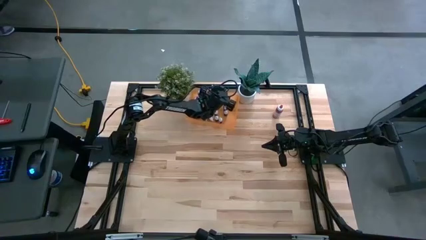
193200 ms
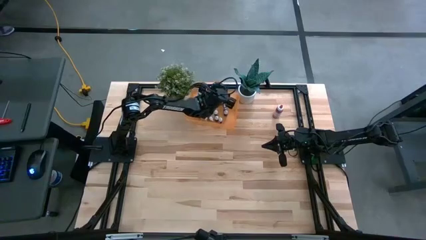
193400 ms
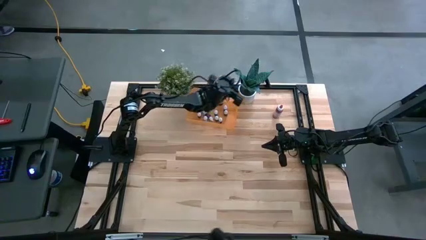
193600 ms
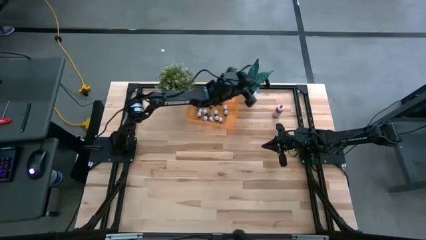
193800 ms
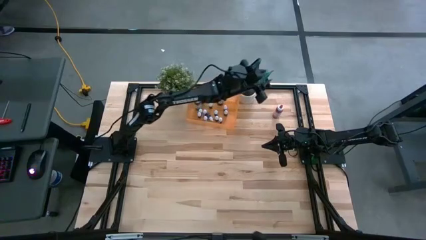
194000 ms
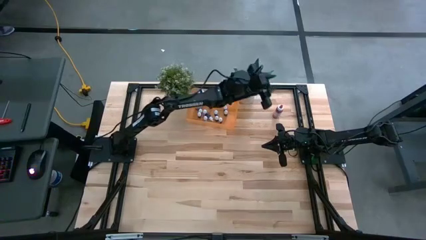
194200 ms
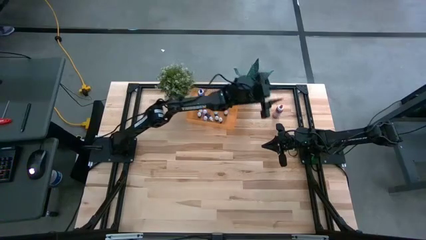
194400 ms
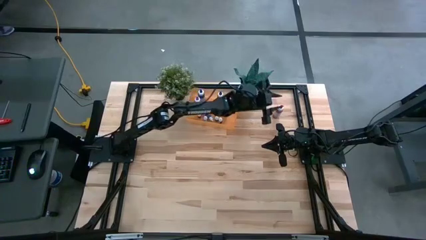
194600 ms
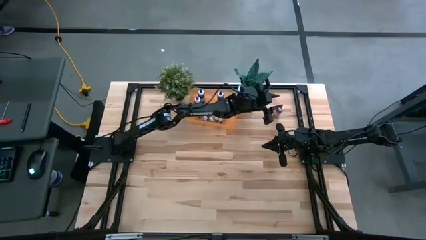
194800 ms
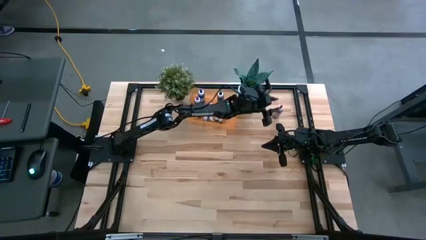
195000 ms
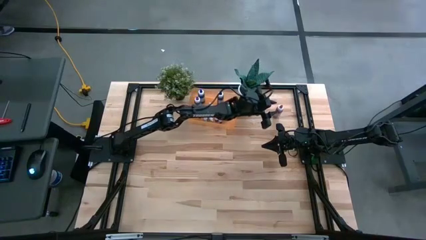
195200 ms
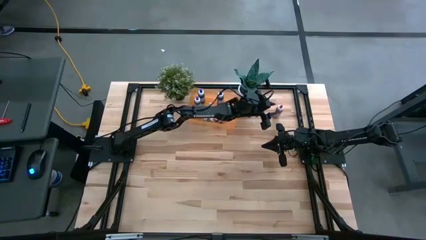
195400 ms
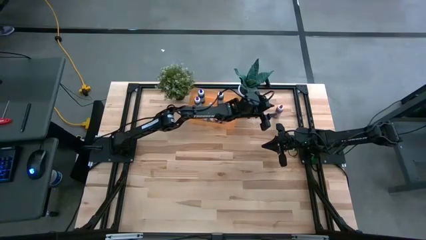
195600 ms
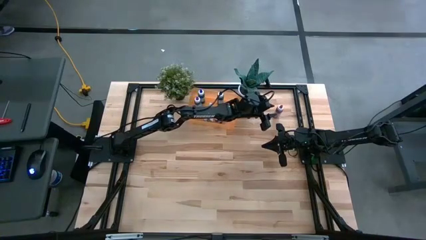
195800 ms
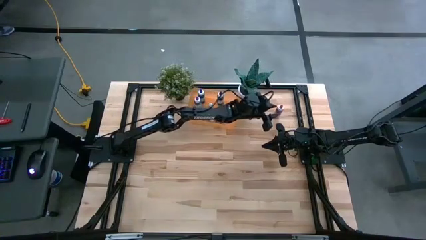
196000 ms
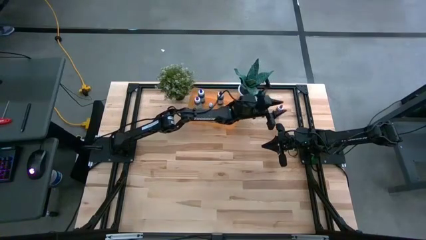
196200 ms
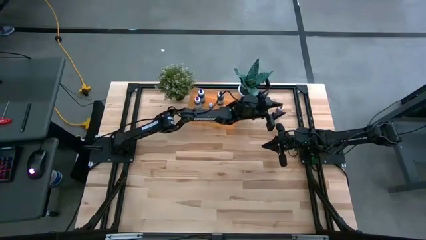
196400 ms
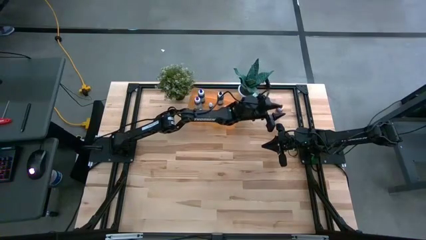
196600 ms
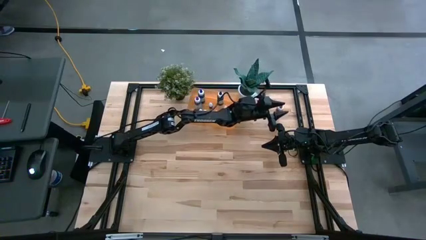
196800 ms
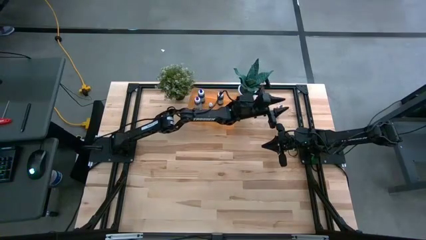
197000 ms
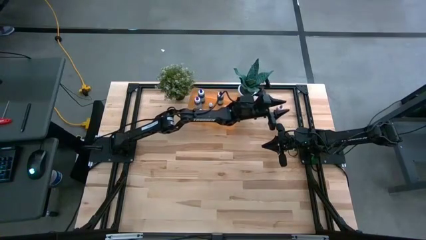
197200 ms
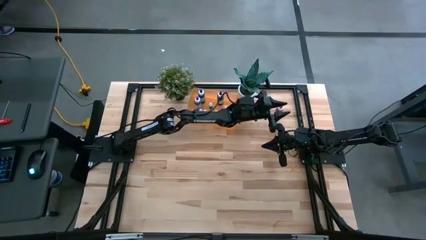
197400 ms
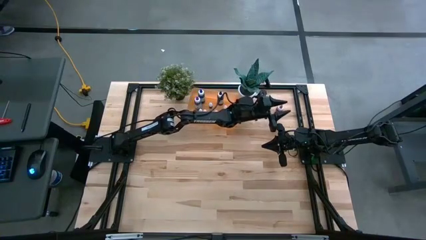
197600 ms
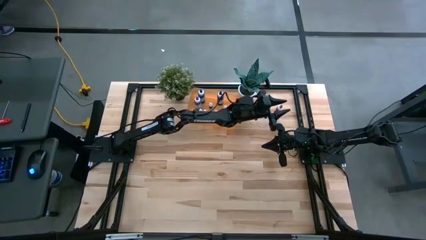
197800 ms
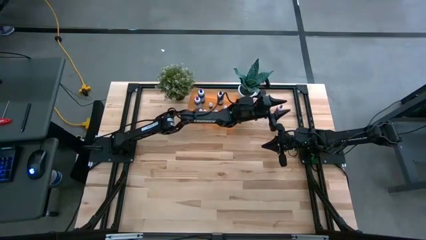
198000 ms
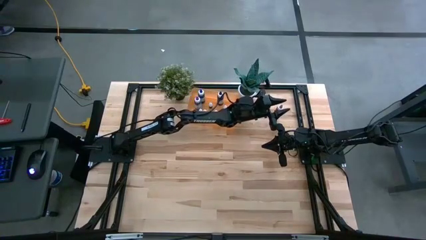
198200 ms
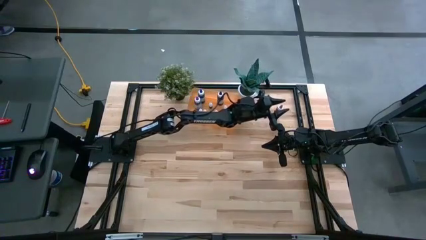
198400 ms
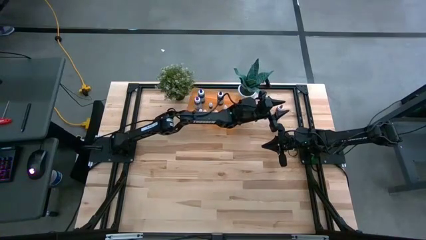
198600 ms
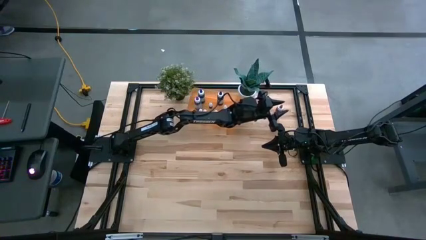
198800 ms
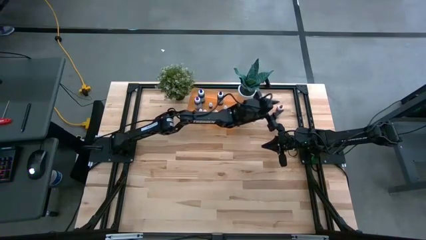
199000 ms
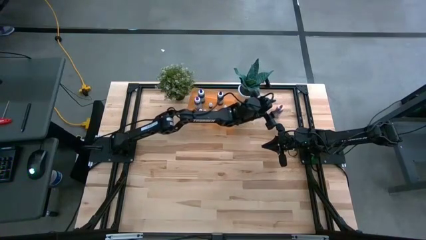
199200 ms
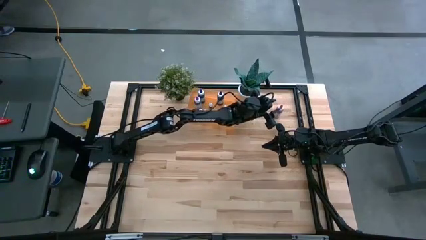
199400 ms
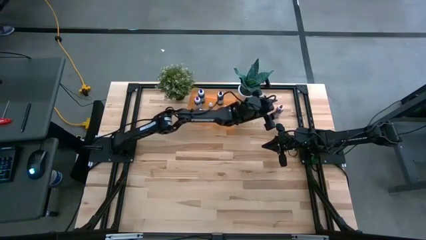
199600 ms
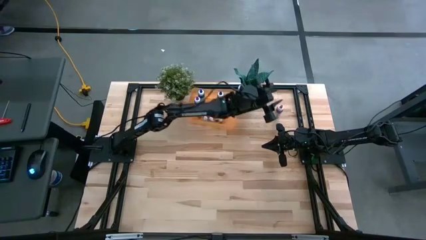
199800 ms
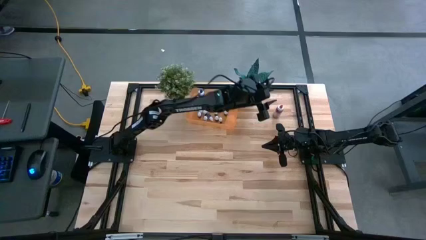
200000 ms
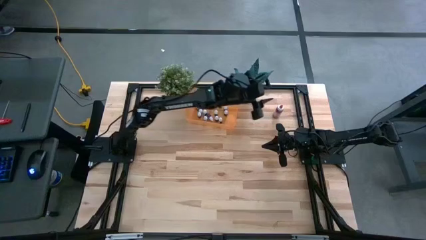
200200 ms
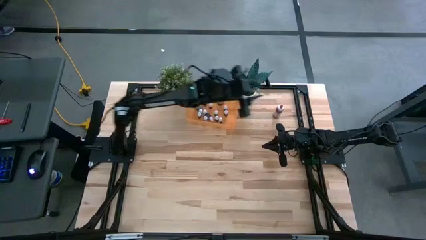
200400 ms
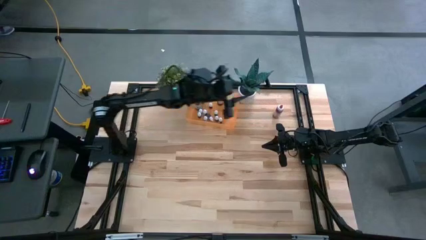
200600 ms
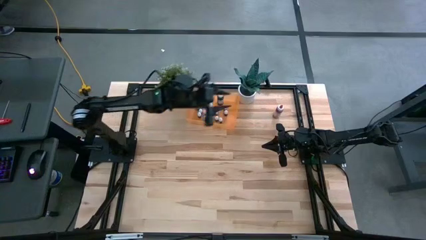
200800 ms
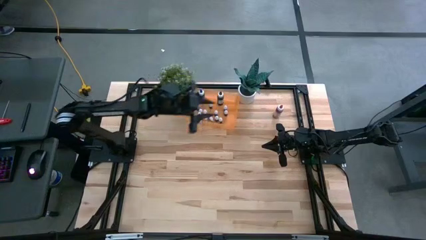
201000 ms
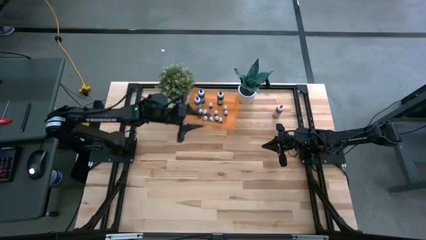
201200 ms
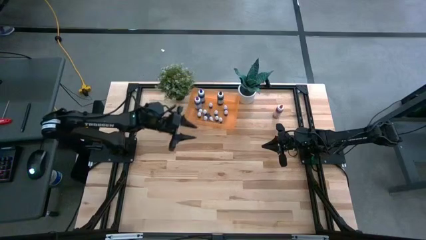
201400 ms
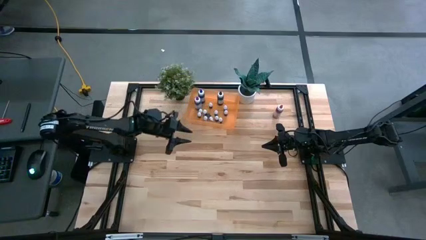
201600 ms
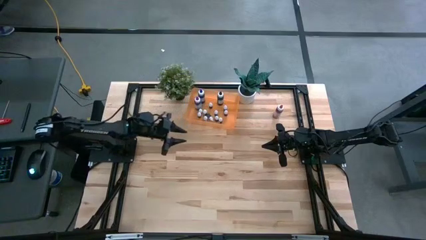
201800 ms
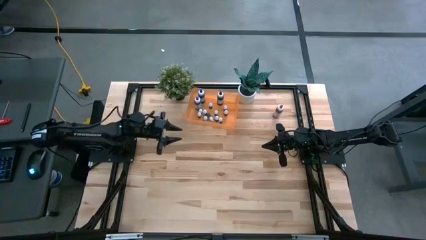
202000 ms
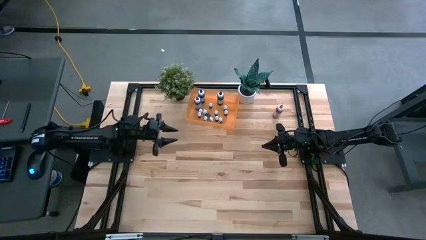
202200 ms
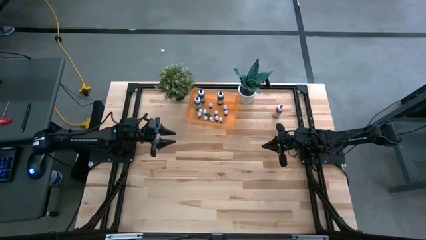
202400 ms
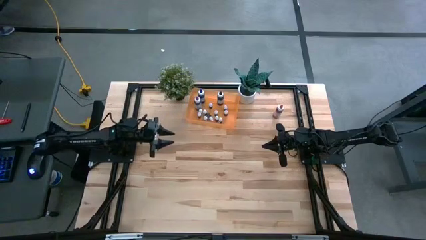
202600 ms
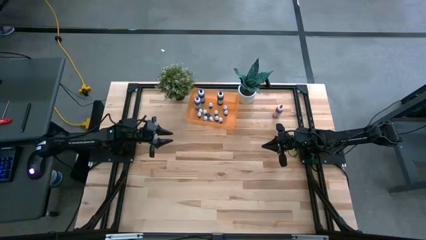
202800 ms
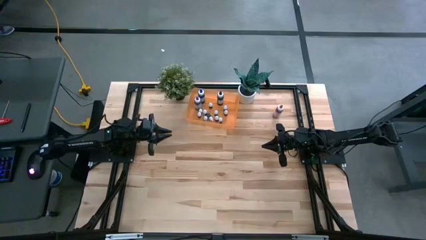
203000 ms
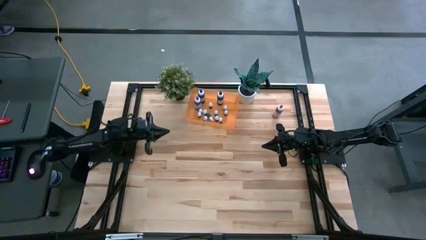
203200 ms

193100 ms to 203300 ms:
Task: Pick & Place food coloring
Put the large pink bottle into the bin

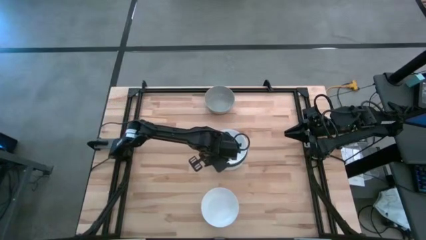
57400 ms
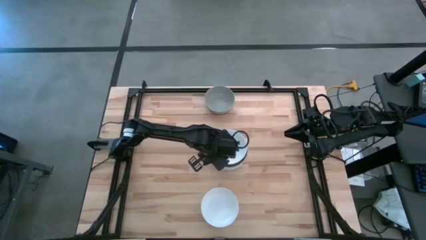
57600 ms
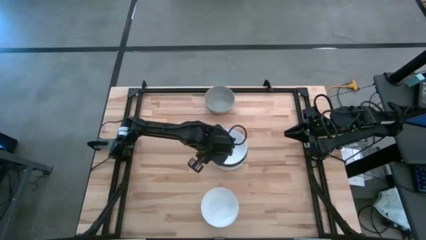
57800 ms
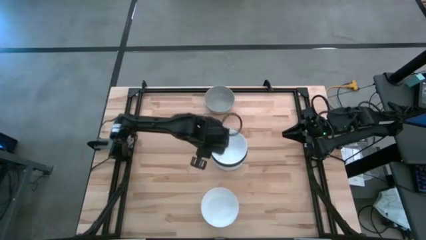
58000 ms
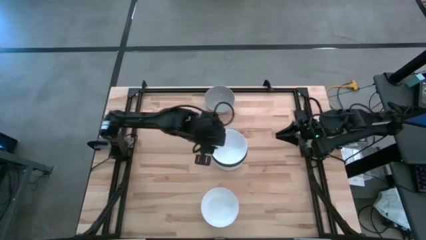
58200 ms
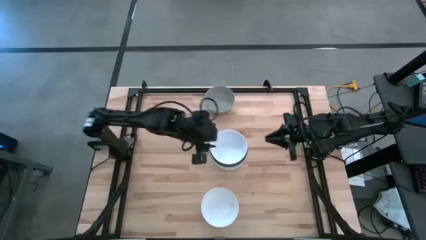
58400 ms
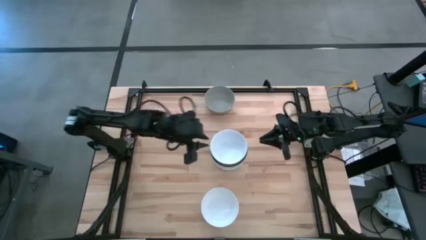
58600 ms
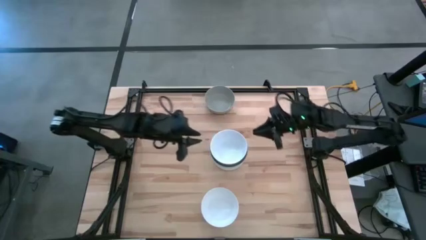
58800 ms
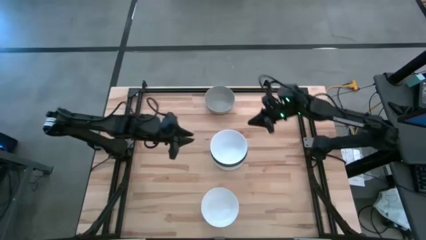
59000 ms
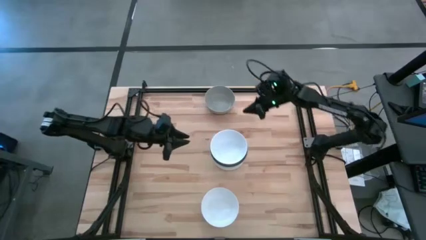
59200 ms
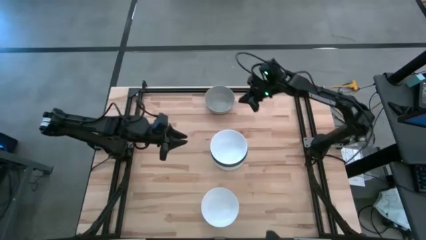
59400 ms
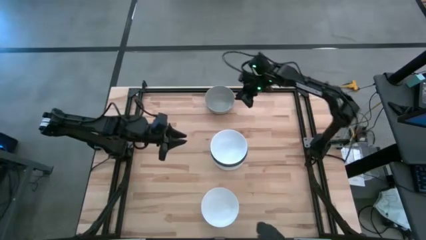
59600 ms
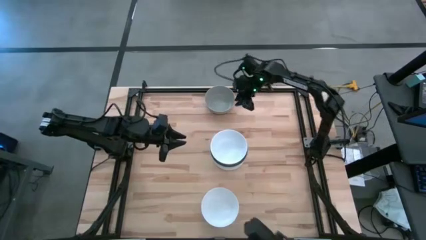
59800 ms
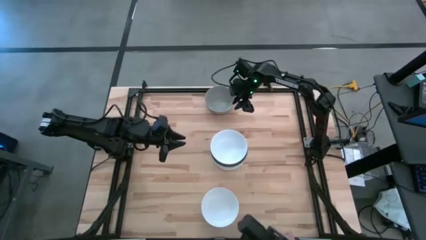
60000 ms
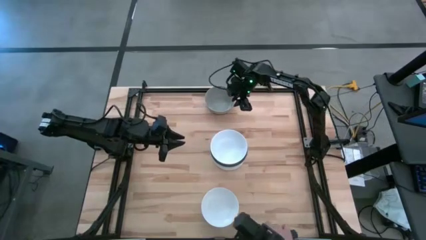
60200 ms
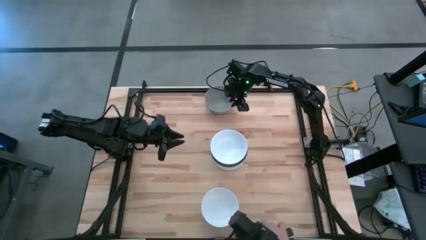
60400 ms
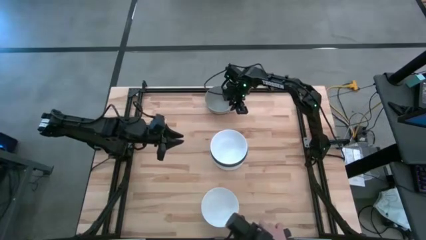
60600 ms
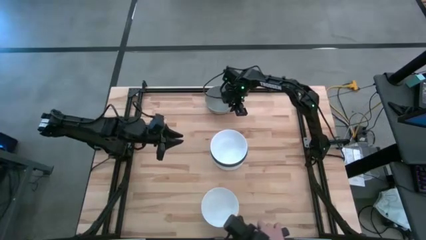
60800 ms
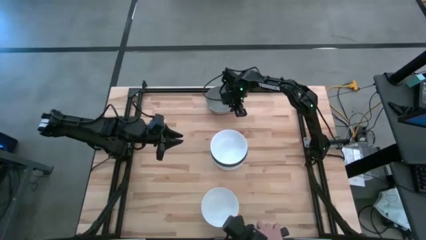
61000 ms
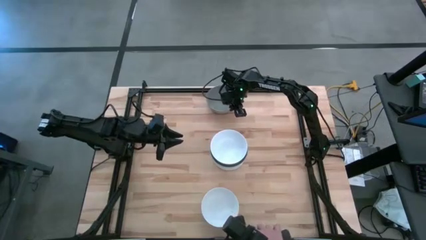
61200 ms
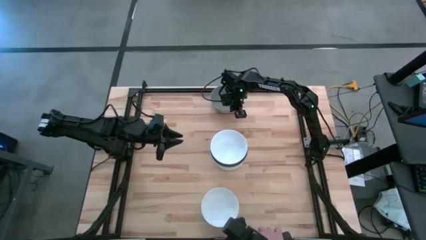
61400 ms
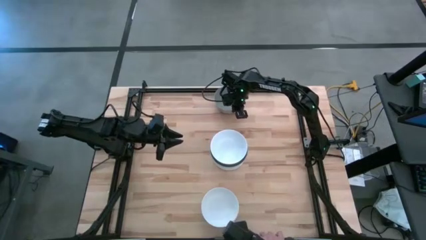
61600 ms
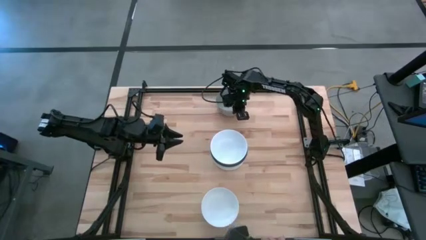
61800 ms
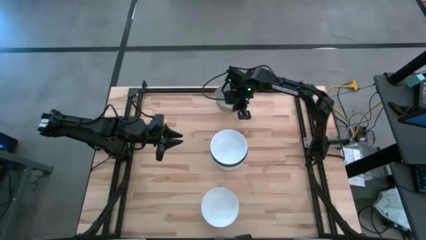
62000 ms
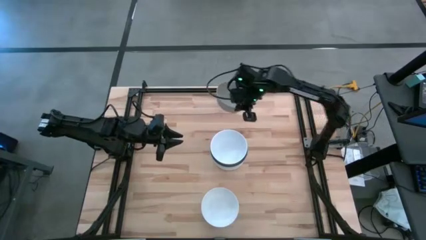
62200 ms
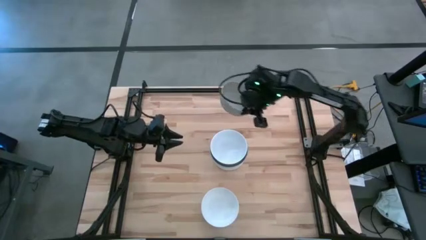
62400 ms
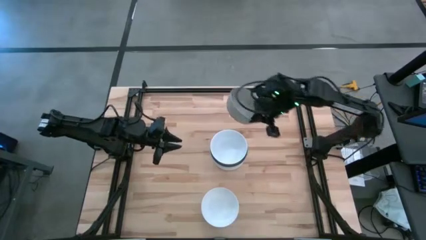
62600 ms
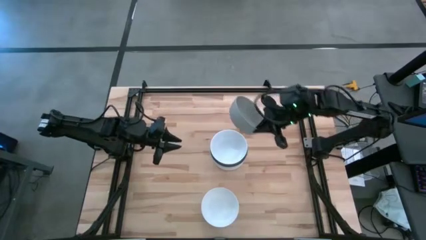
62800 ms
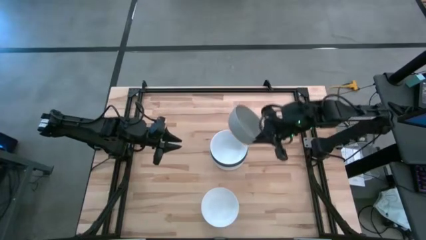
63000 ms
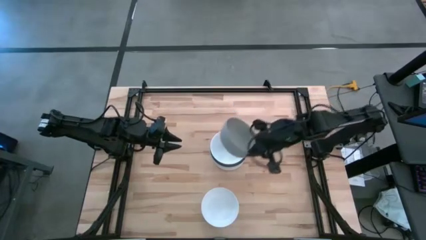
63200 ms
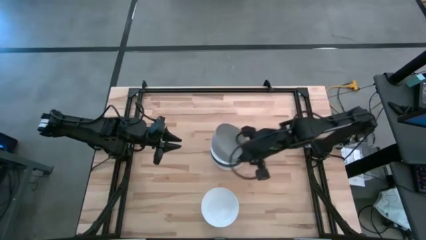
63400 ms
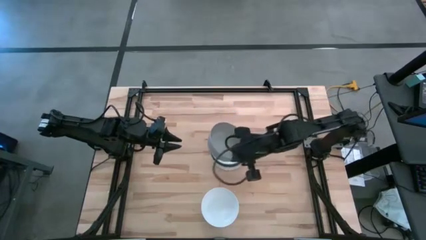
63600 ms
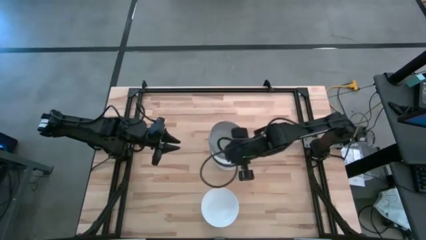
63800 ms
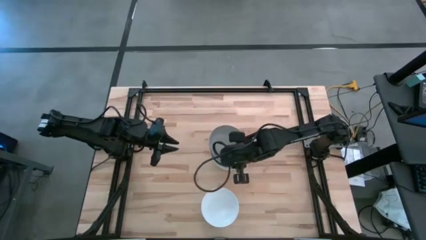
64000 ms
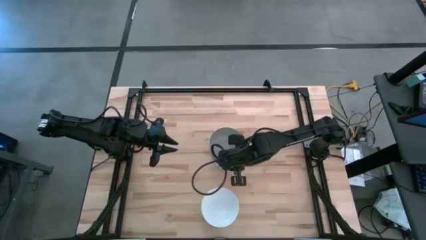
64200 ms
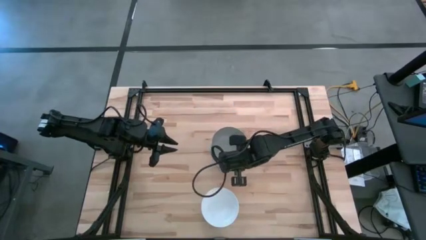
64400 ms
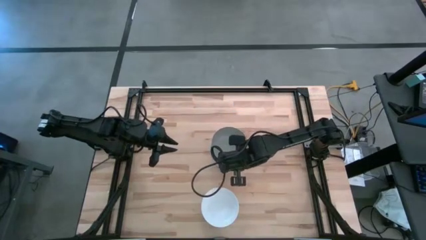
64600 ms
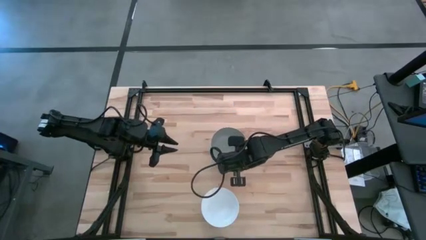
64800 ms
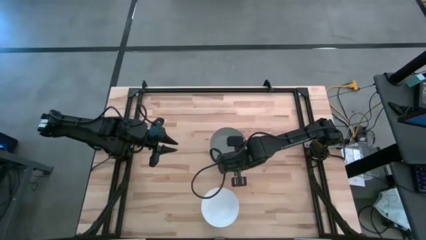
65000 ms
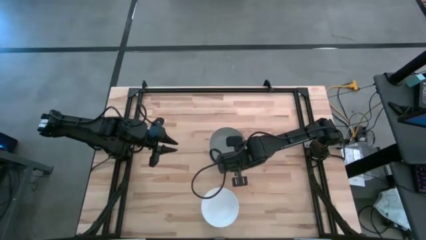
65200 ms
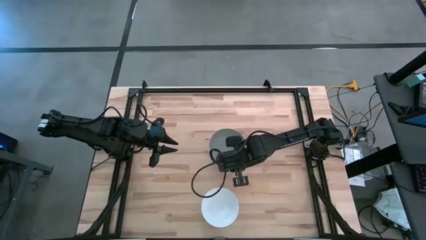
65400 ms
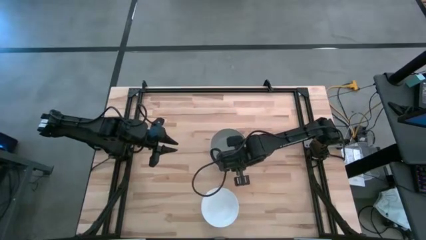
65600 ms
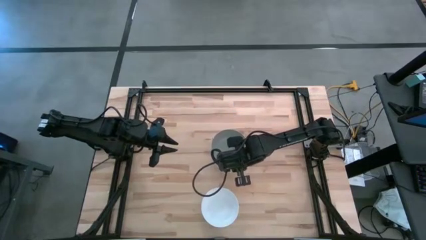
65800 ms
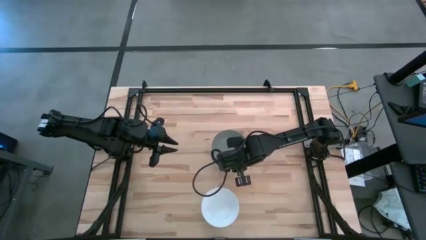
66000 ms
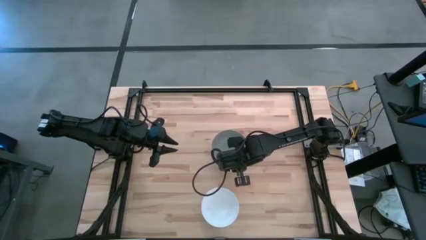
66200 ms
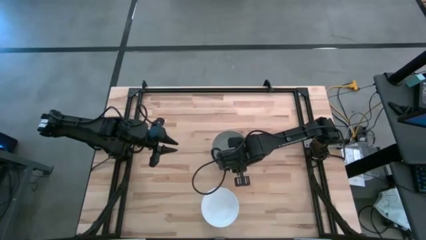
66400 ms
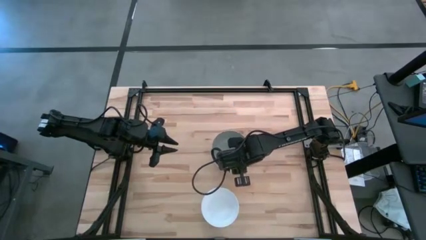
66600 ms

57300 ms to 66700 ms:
Task: Nest bowls inside each other
Stack the gray bowl on the top white bowl
